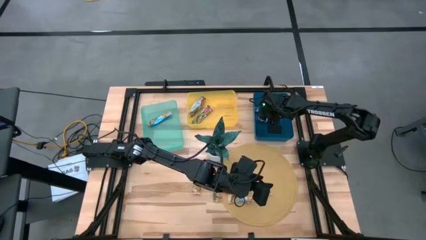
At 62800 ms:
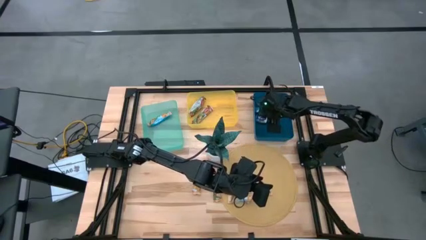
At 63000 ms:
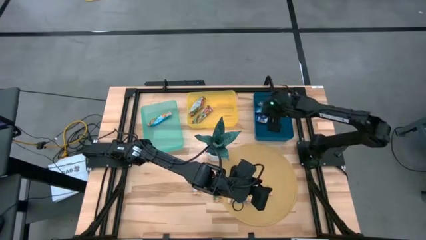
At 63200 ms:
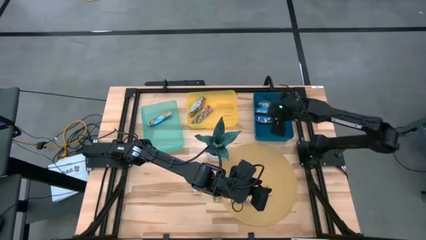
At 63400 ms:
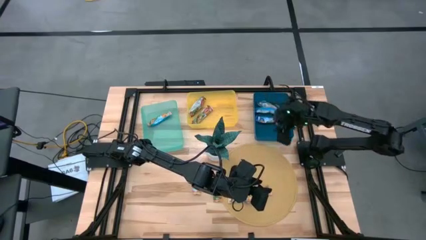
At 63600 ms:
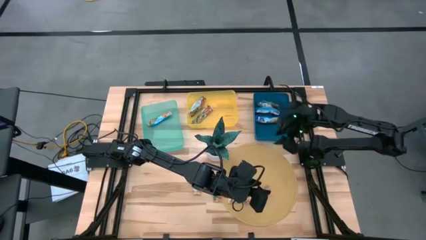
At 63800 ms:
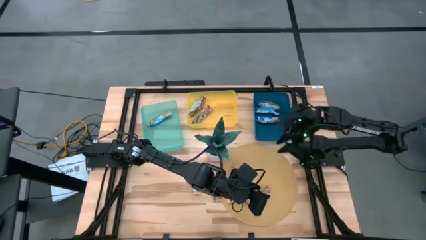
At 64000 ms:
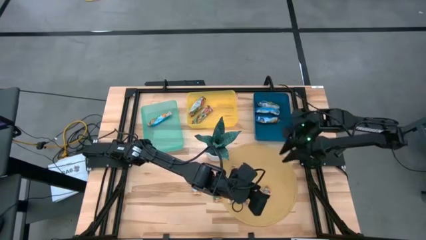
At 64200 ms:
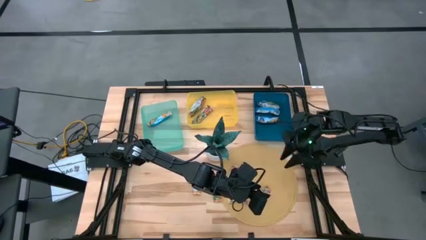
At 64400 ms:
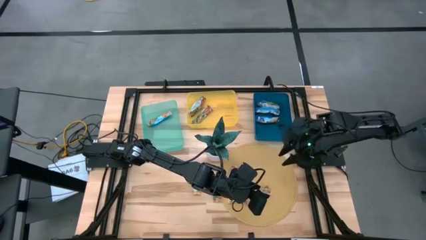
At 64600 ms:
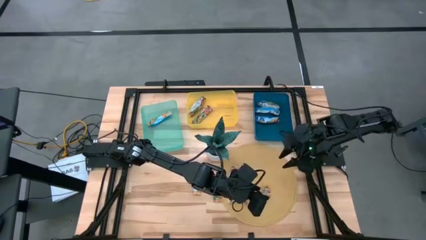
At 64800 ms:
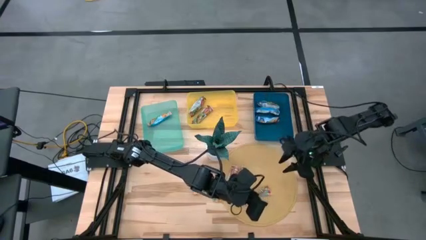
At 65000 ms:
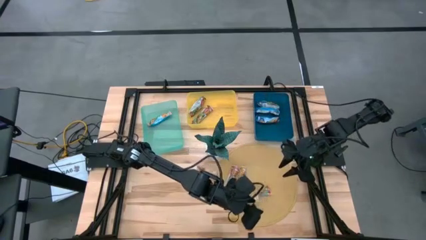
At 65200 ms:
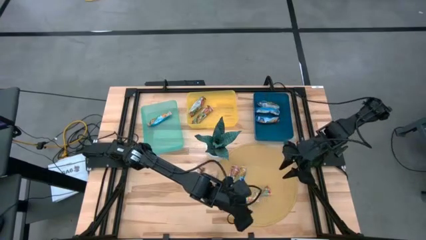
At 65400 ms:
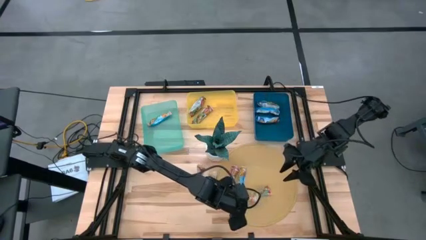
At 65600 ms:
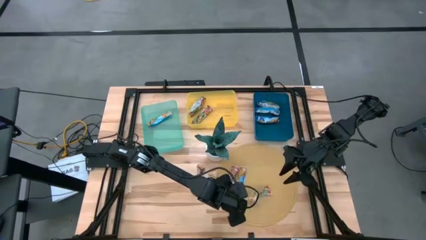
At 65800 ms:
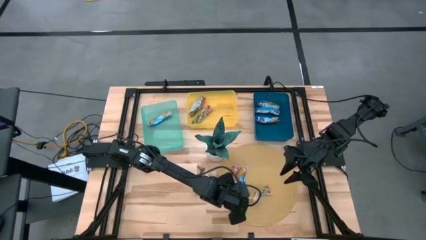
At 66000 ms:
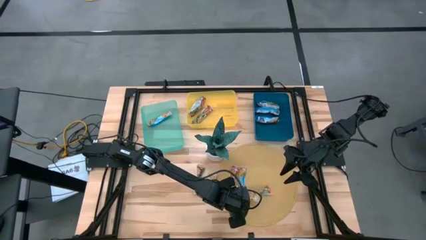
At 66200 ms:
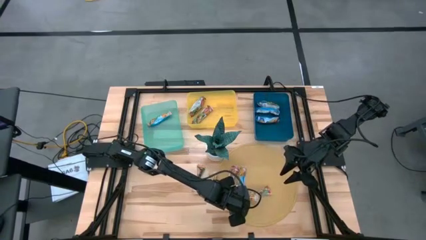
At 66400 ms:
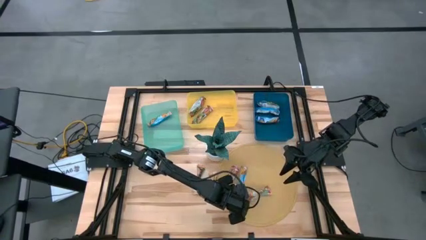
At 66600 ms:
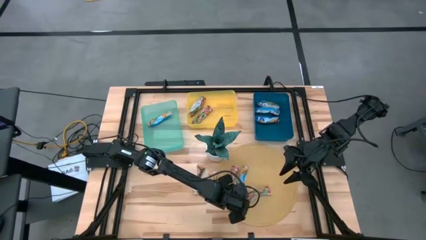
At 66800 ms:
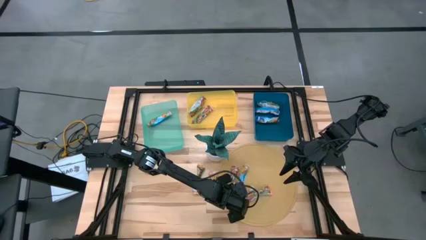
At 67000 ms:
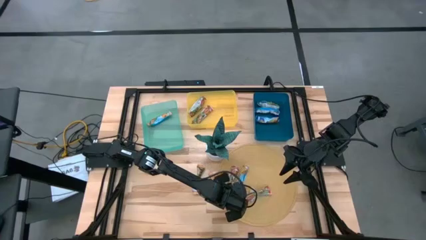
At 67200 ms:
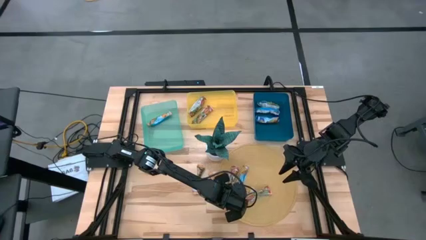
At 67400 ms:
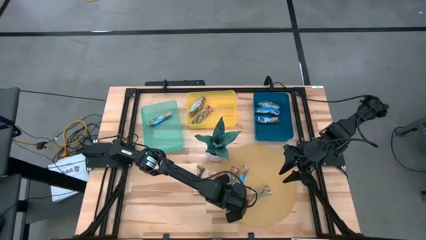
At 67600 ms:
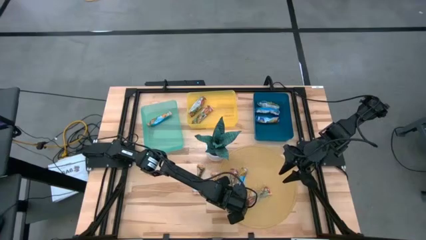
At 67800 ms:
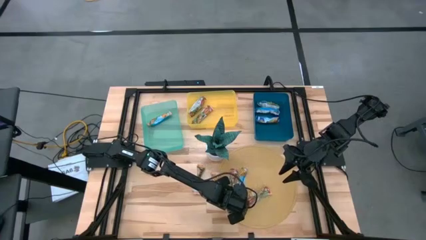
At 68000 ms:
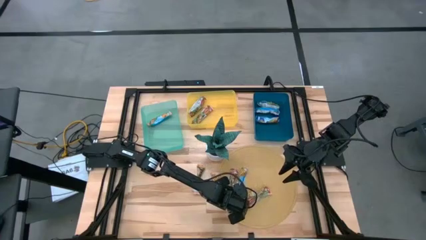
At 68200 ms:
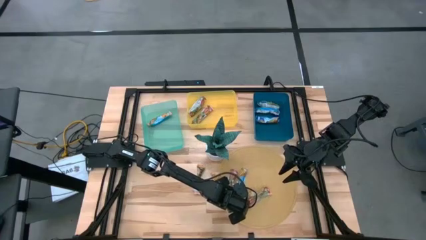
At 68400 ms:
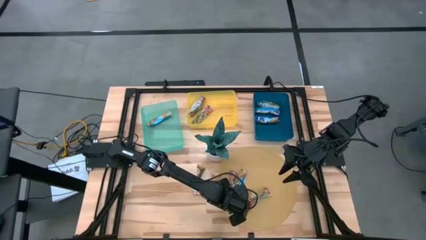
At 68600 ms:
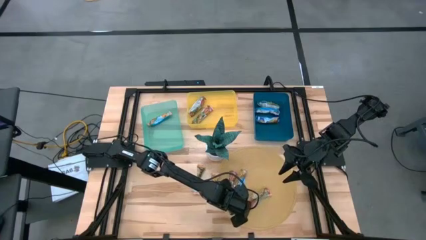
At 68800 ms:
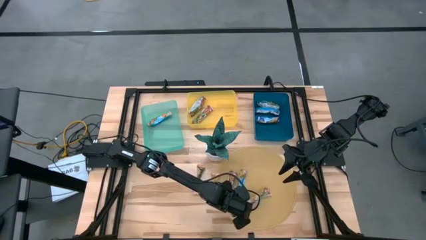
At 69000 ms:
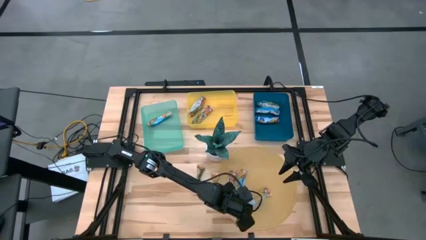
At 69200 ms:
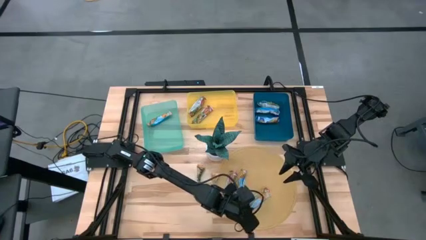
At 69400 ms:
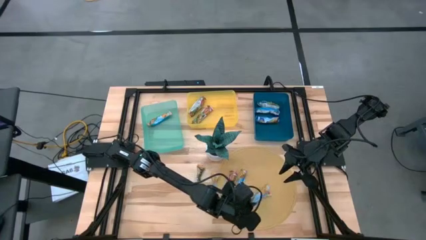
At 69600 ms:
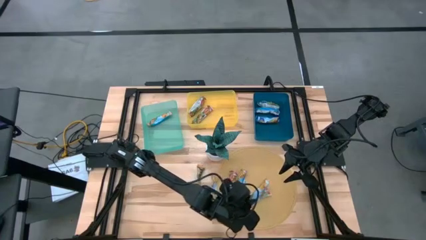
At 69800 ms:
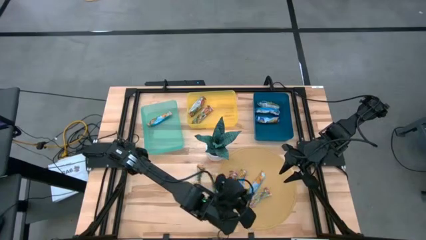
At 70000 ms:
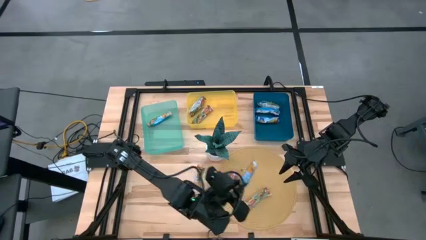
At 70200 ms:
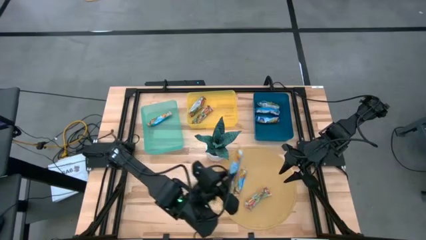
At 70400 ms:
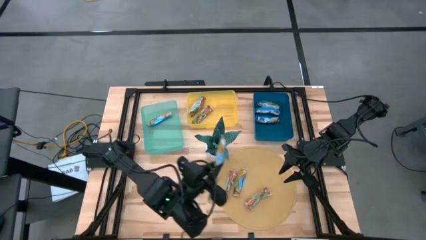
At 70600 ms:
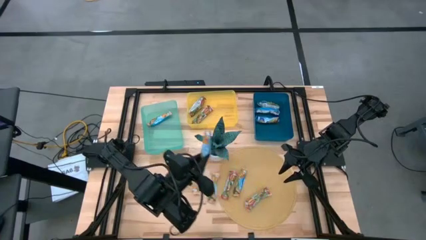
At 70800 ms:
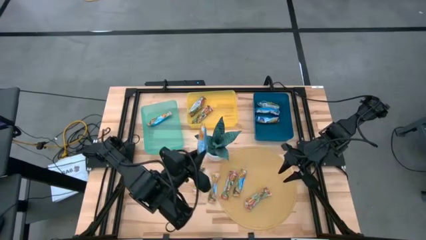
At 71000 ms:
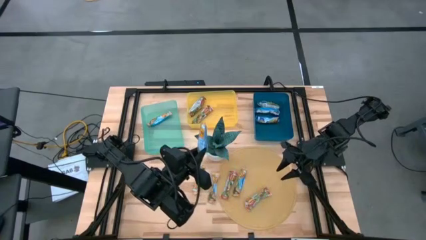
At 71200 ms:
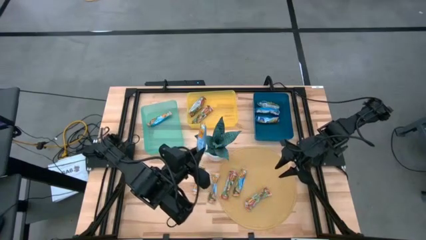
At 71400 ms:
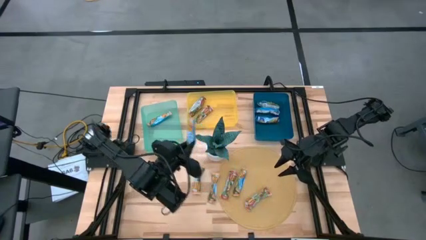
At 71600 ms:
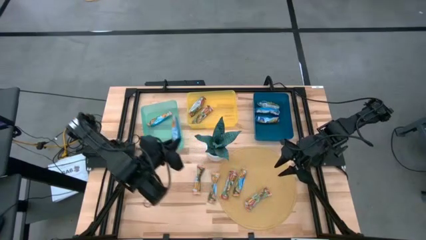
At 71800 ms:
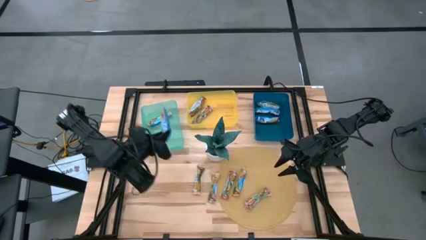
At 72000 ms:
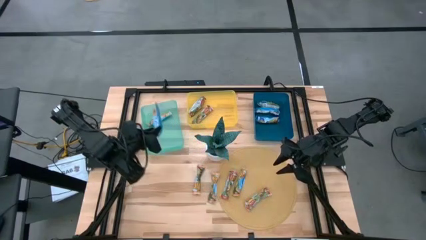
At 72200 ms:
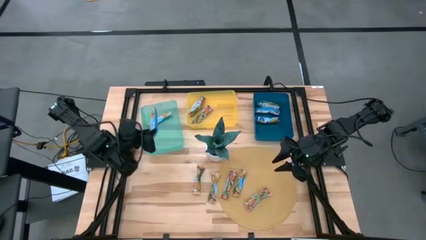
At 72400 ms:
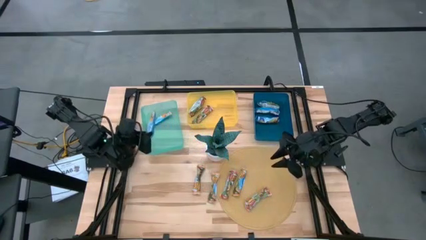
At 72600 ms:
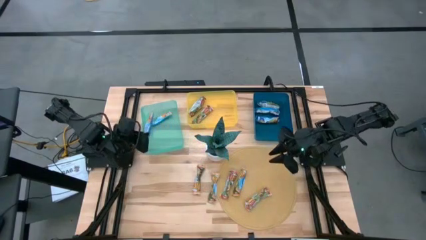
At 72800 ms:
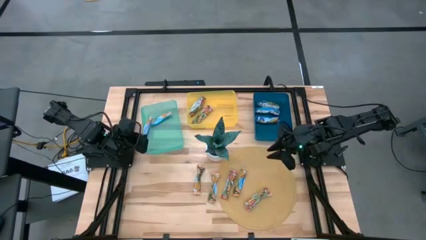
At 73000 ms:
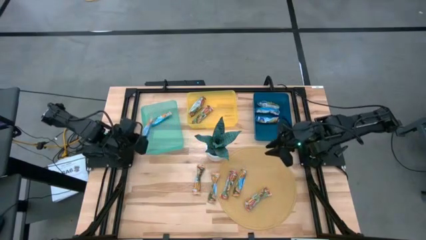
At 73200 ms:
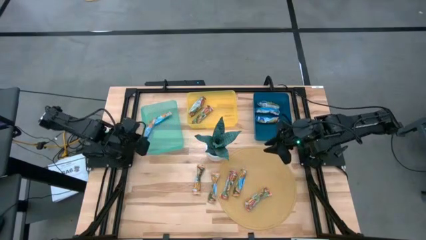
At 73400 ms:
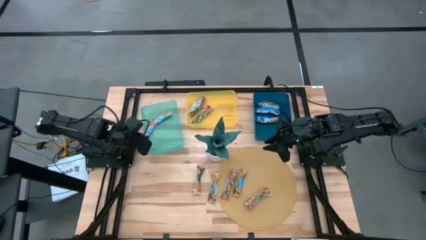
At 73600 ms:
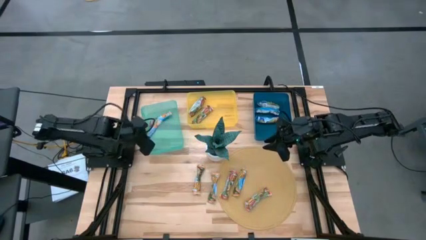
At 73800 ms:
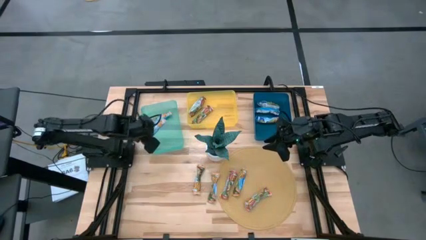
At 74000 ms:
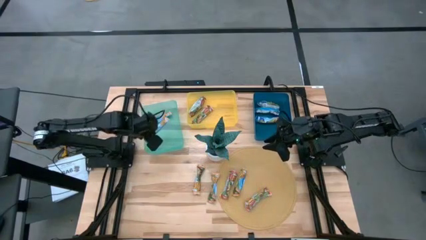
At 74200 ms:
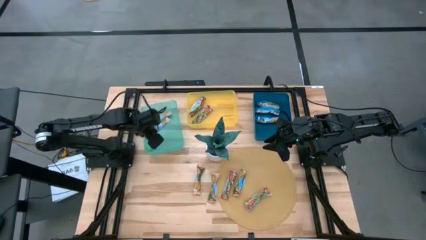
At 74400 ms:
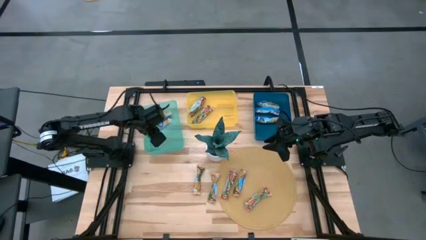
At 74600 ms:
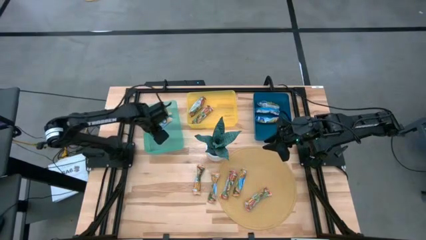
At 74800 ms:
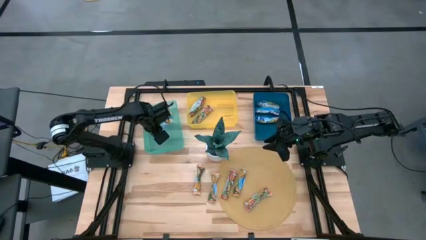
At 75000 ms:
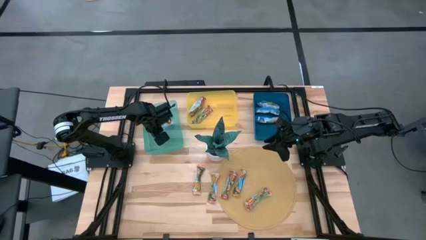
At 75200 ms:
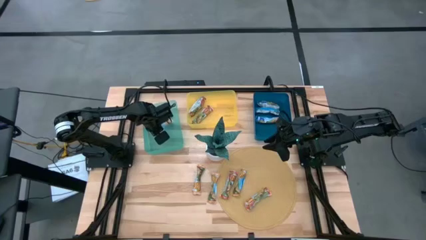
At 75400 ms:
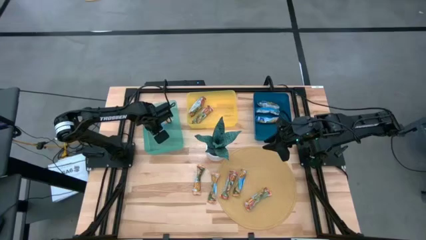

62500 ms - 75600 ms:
Task: Pick and place Granola Bars by type
Put the orange granola bar into the green bin
